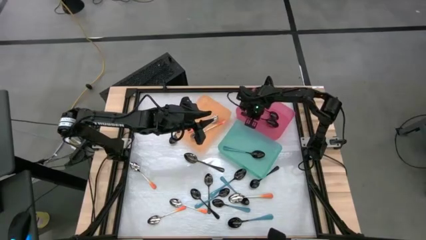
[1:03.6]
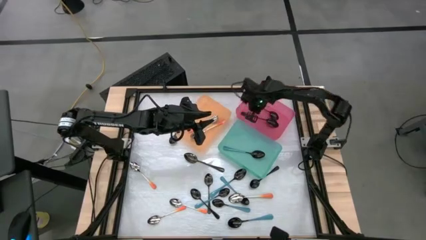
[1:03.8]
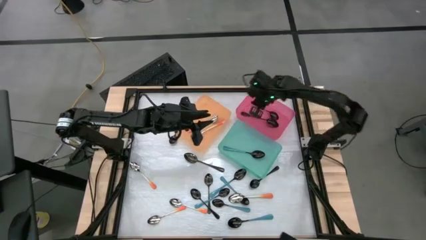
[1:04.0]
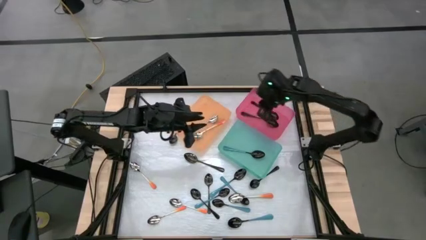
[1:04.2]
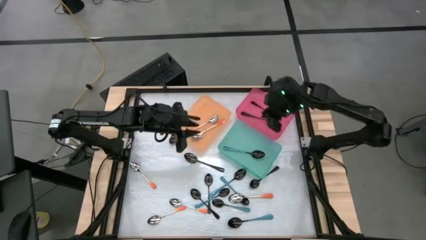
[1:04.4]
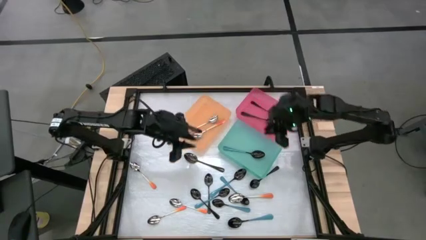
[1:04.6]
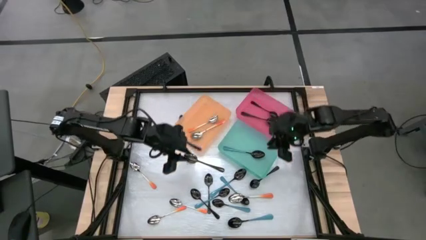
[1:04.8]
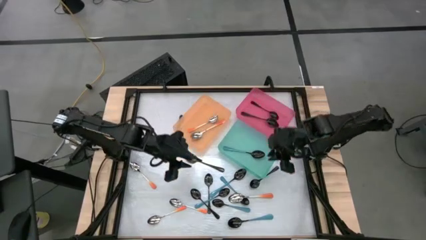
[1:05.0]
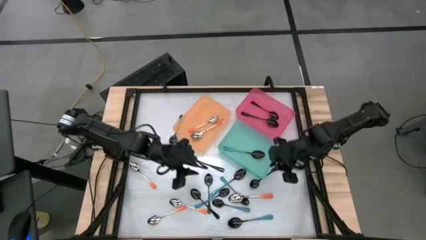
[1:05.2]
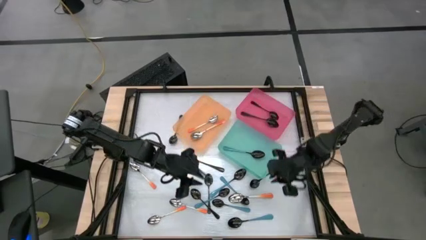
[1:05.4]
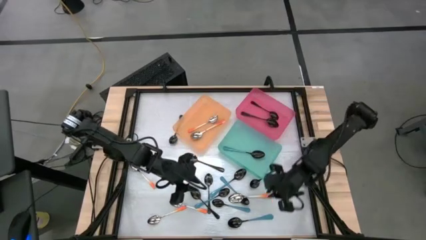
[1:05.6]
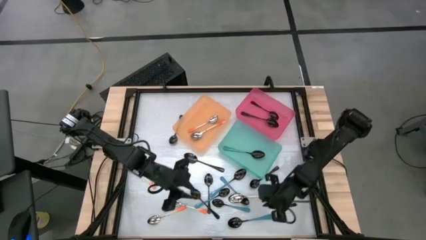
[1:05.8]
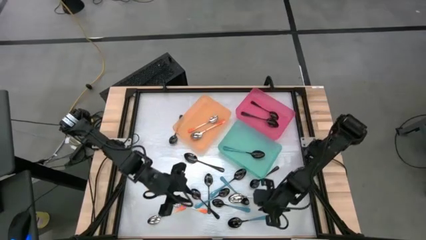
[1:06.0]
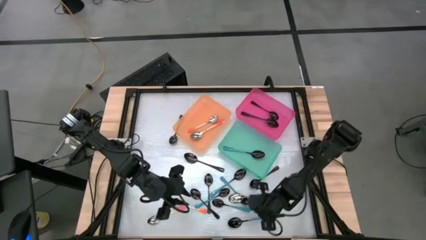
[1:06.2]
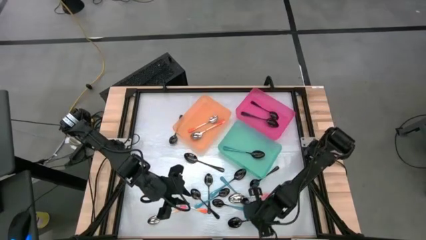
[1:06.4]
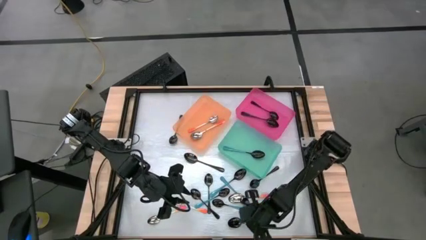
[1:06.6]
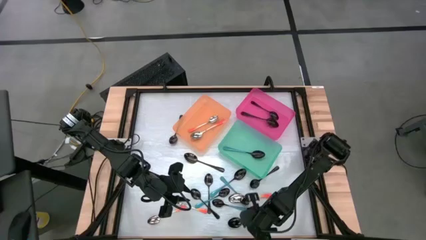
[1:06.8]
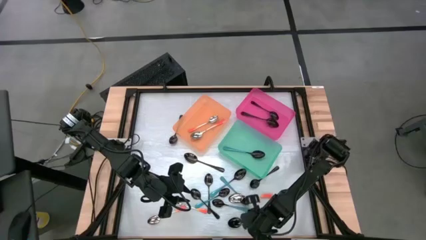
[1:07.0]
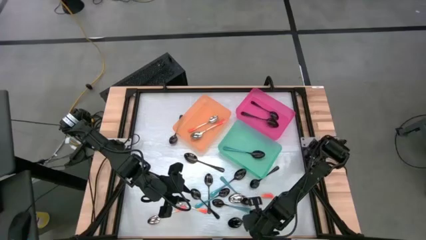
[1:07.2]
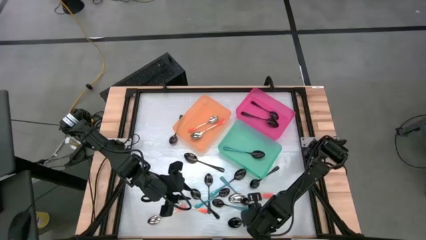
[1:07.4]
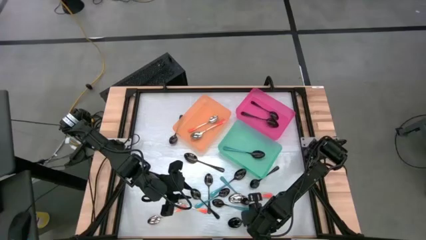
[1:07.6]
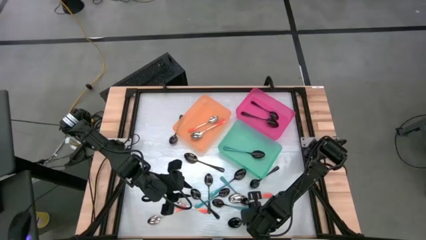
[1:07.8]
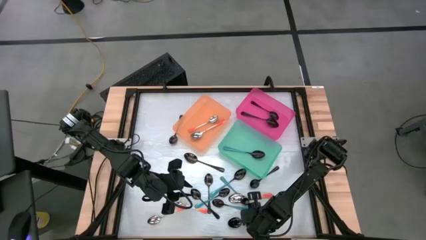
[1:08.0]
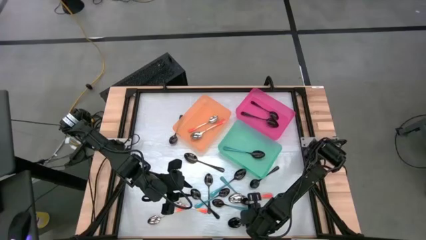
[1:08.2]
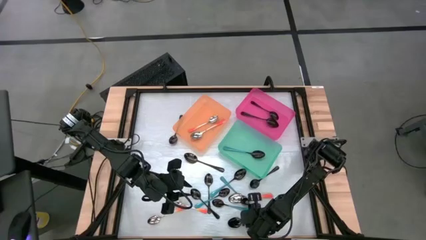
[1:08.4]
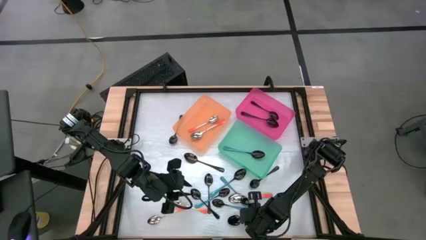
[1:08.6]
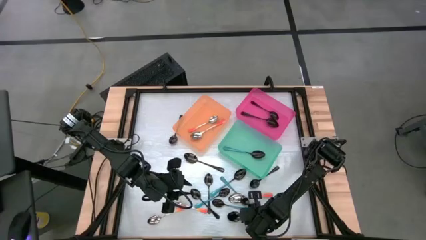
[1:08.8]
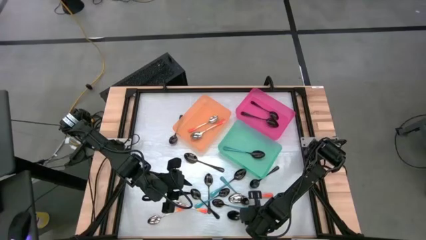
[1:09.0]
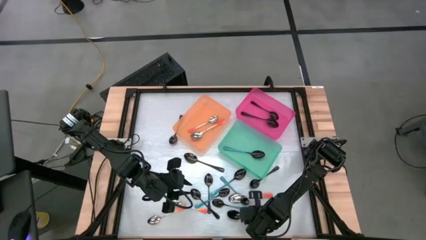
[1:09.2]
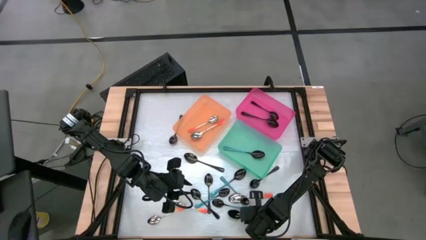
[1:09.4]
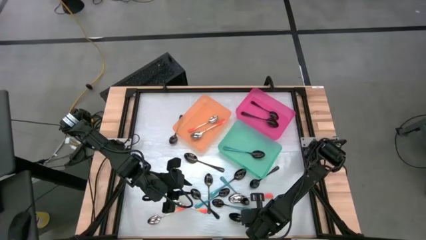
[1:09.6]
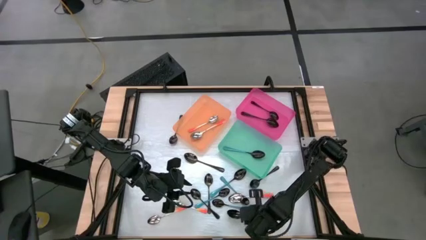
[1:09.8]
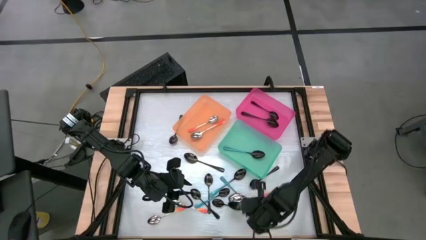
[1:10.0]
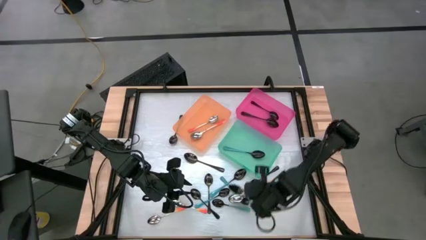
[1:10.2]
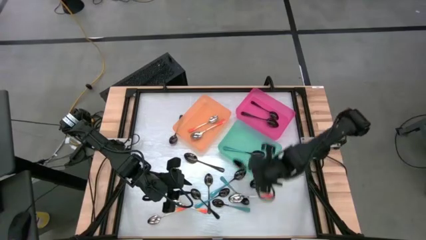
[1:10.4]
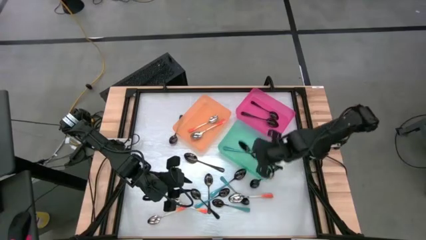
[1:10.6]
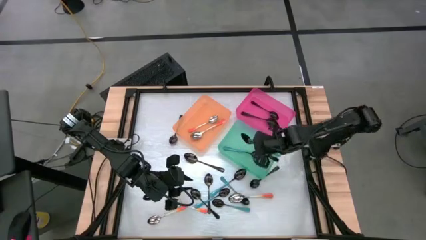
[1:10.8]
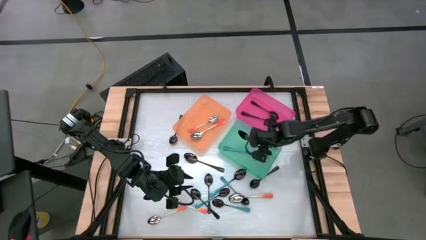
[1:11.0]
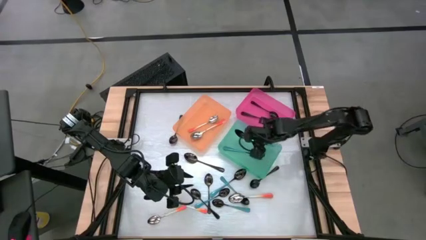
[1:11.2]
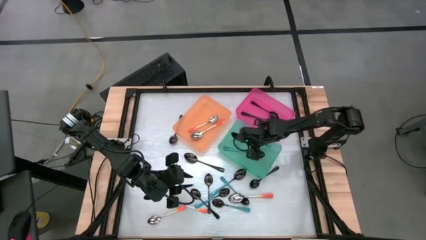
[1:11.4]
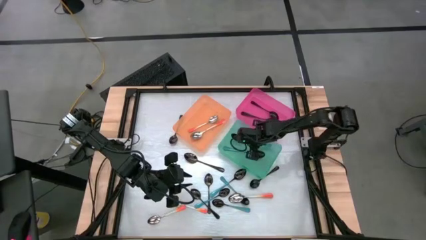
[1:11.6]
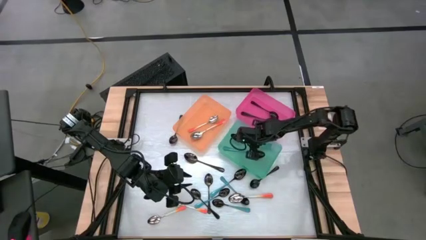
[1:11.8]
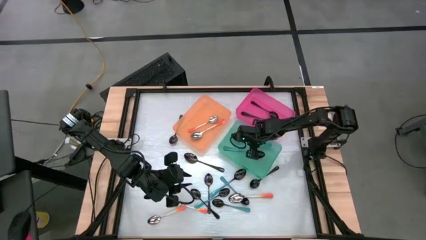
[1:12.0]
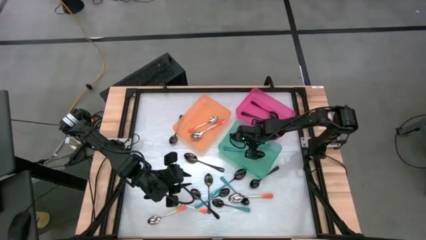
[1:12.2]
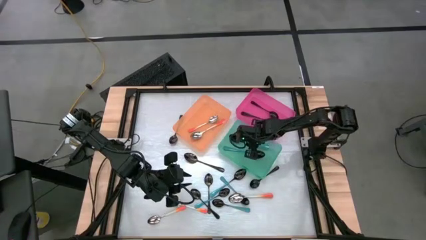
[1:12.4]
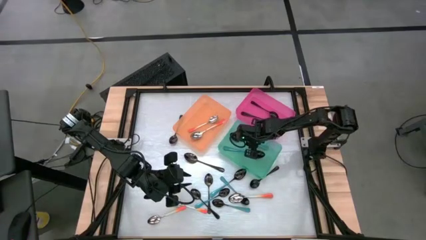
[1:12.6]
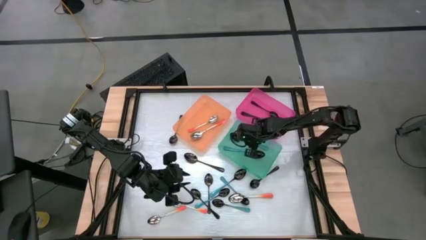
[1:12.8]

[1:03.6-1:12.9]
Task: Sort silverware by color (type)
Put the blue spoon into the blue bin

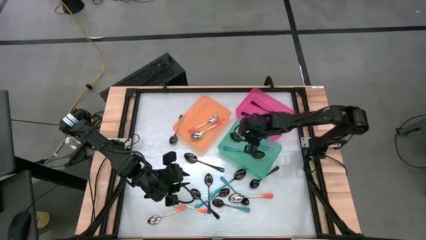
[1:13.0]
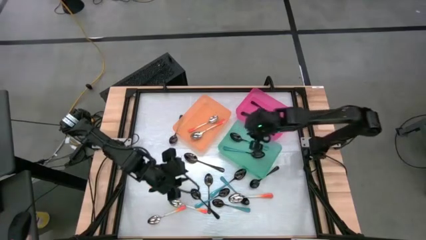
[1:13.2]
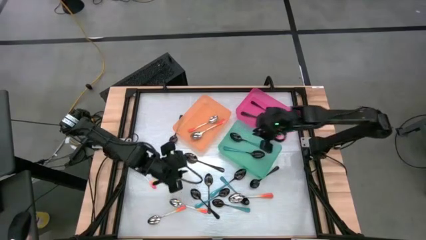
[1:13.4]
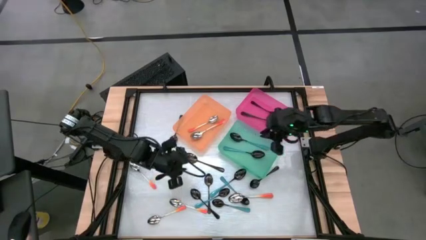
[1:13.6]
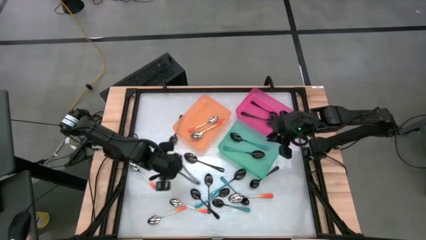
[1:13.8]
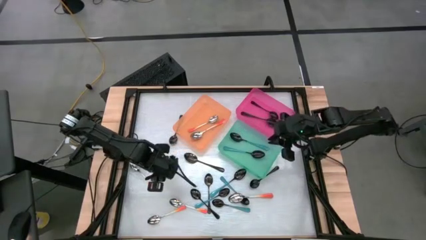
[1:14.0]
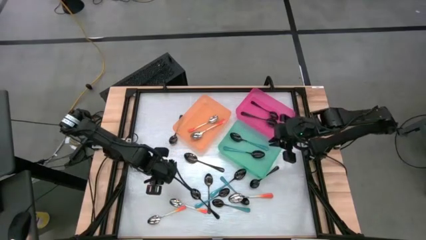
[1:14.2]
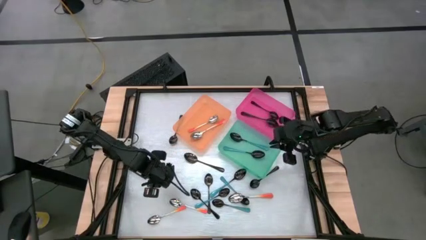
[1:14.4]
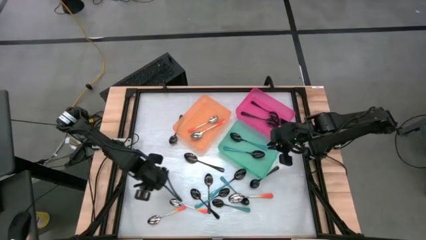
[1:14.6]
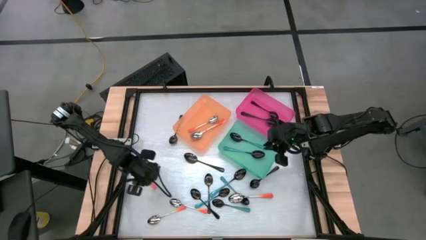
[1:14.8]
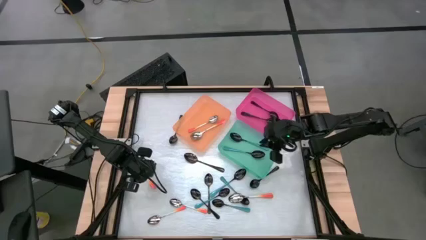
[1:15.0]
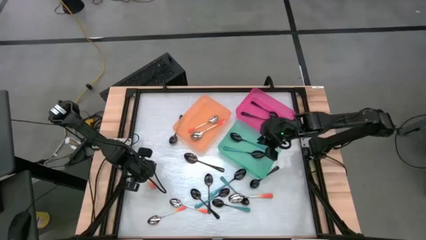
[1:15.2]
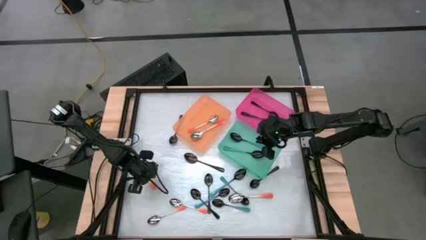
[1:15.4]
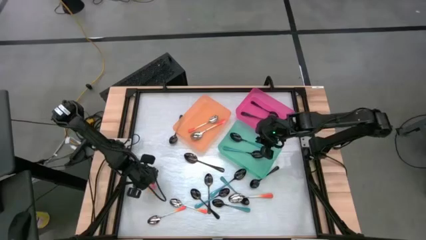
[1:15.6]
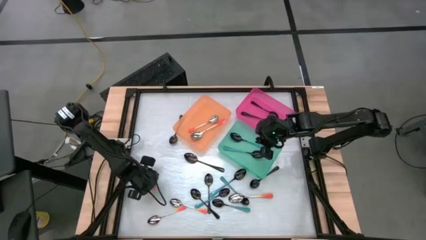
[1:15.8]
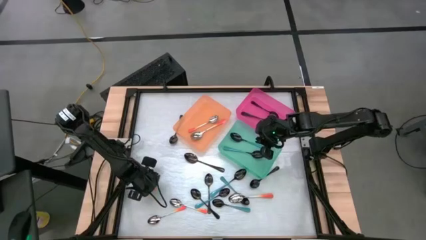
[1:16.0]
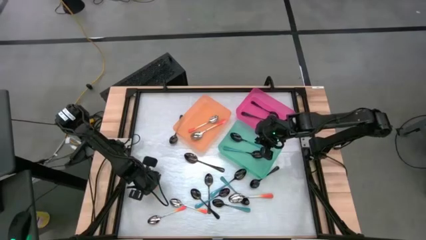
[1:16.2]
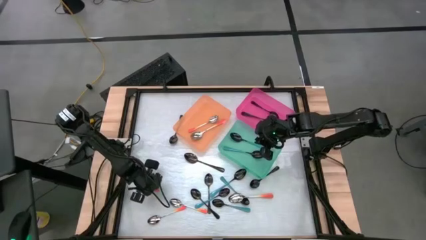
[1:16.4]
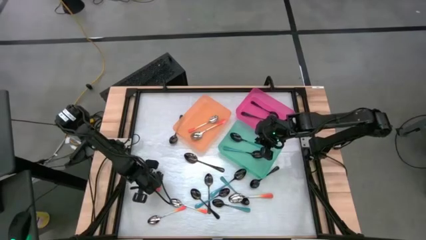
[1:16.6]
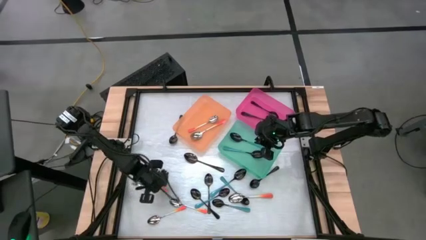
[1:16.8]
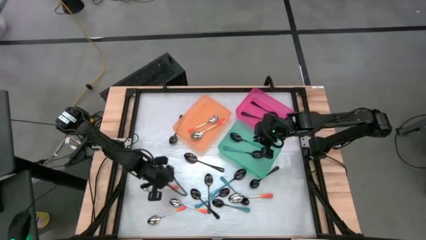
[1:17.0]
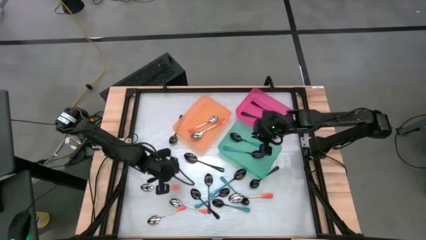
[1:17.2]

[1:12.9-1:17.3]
Put the orange spoon into the orange bin
